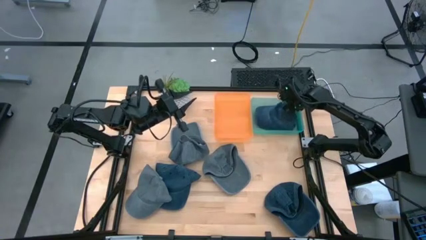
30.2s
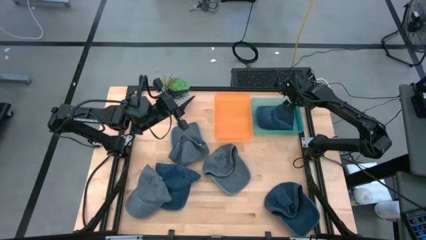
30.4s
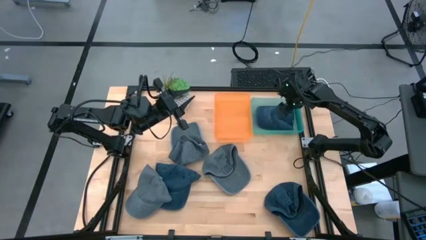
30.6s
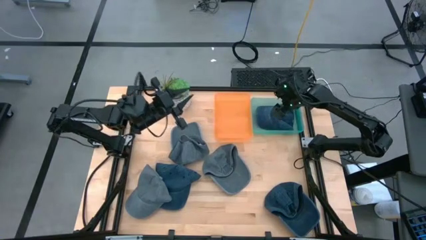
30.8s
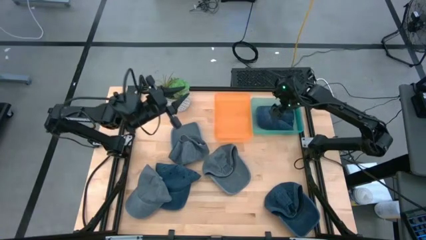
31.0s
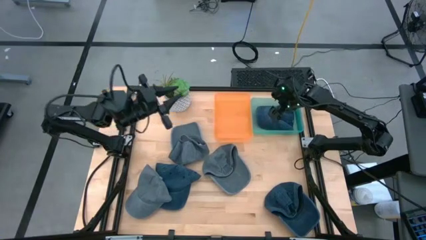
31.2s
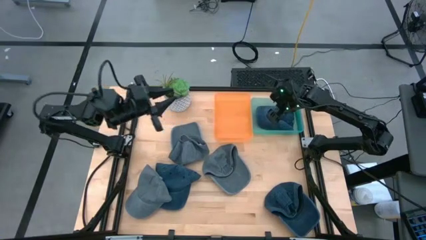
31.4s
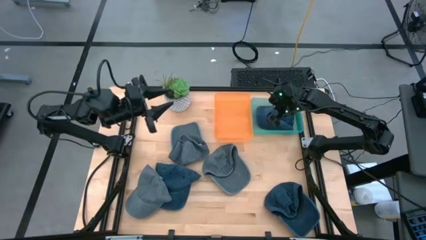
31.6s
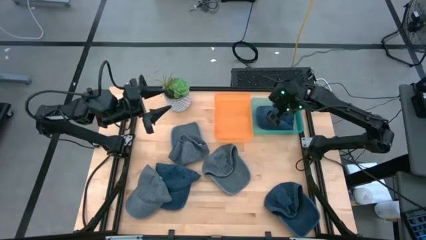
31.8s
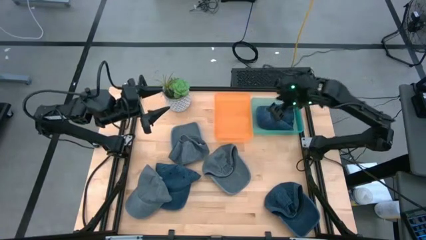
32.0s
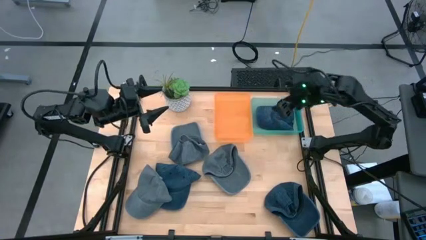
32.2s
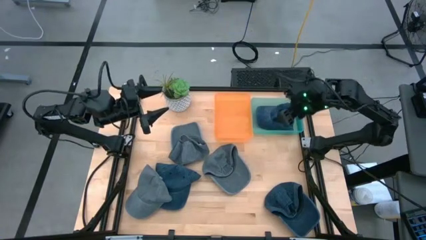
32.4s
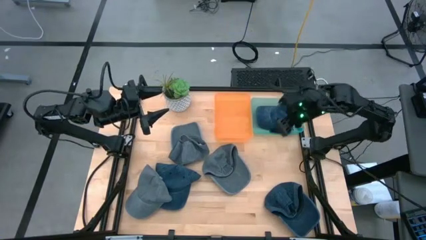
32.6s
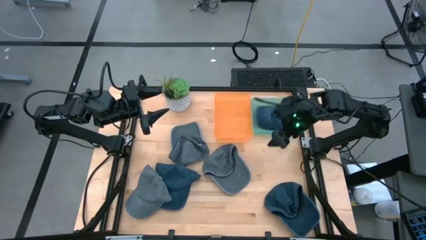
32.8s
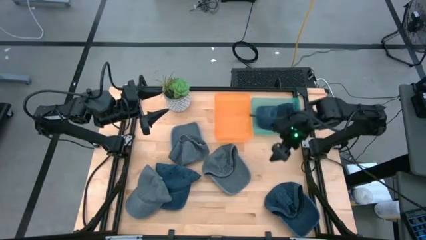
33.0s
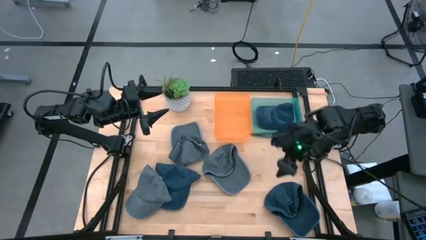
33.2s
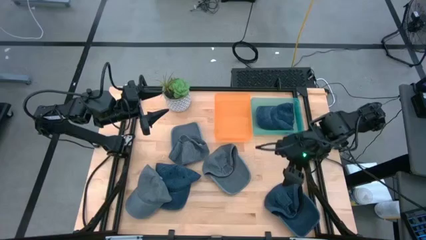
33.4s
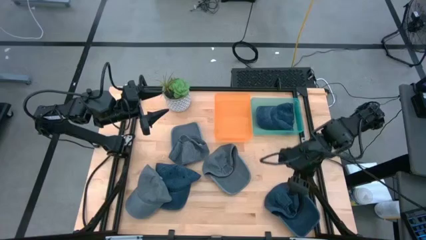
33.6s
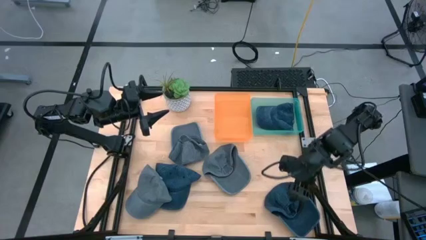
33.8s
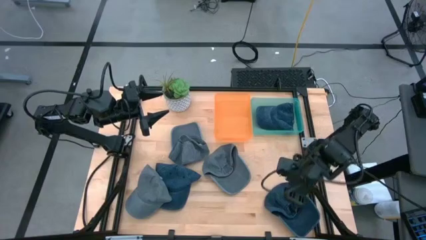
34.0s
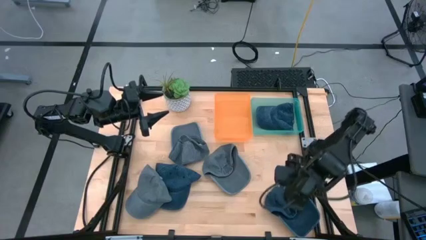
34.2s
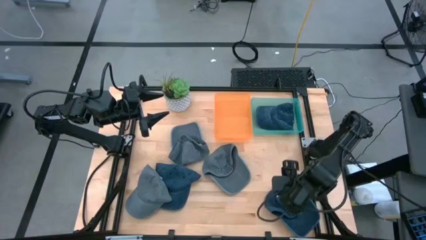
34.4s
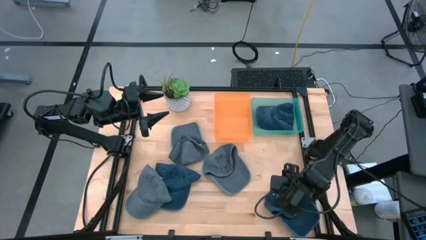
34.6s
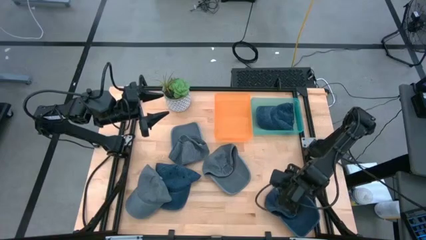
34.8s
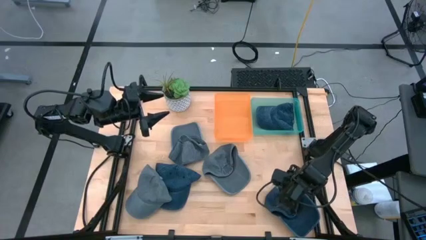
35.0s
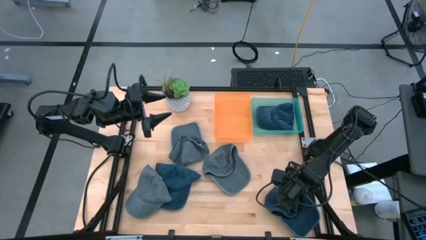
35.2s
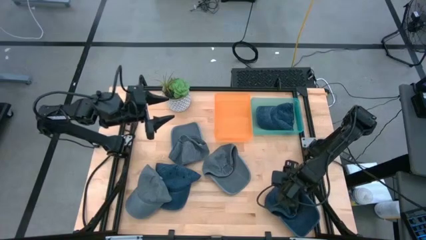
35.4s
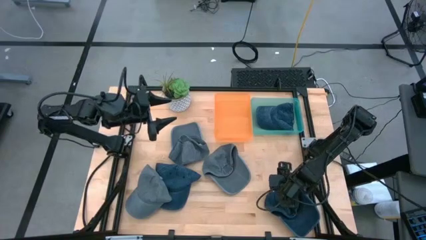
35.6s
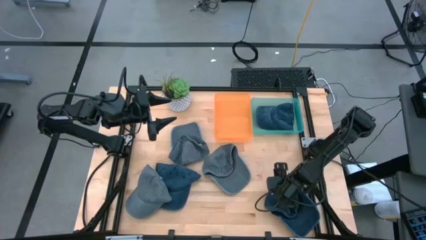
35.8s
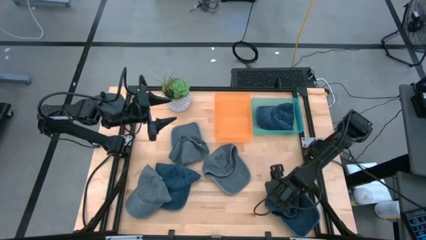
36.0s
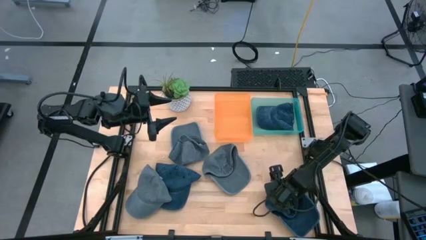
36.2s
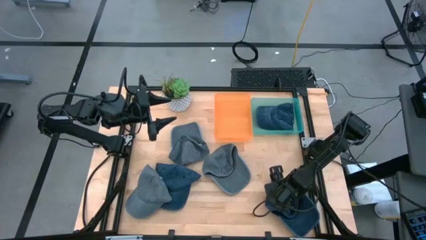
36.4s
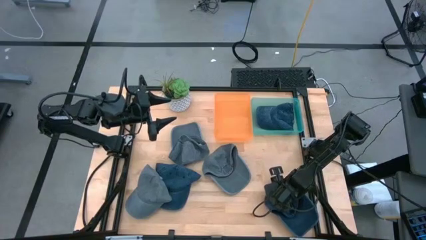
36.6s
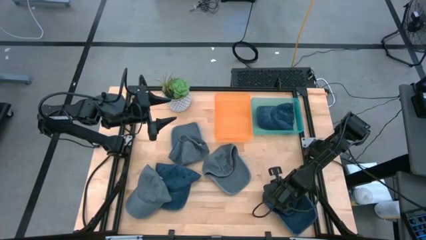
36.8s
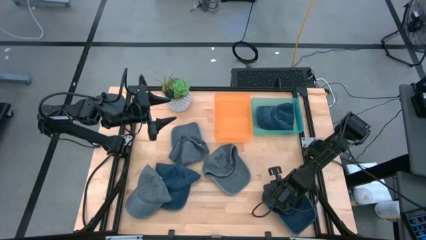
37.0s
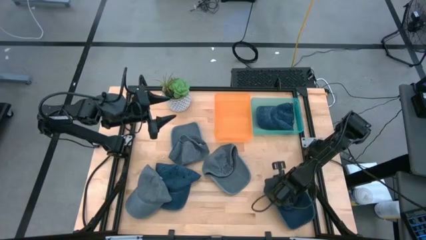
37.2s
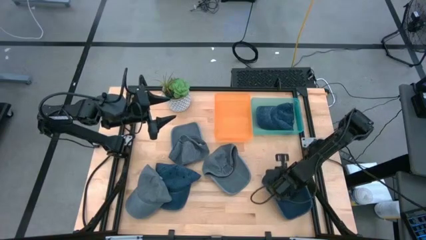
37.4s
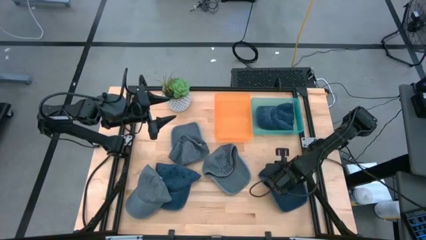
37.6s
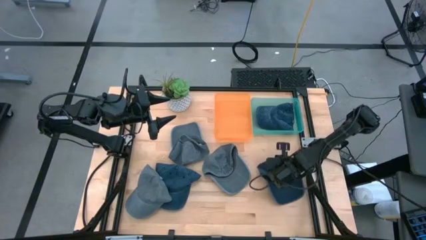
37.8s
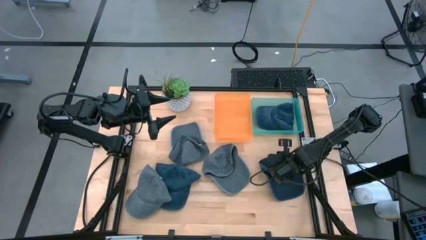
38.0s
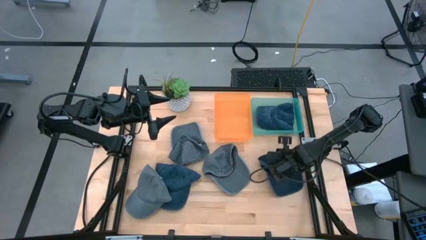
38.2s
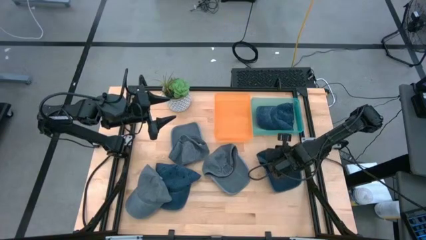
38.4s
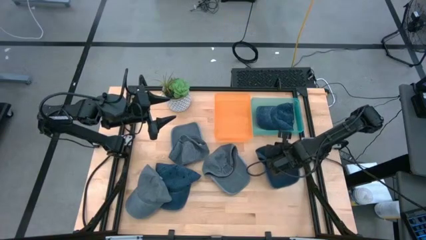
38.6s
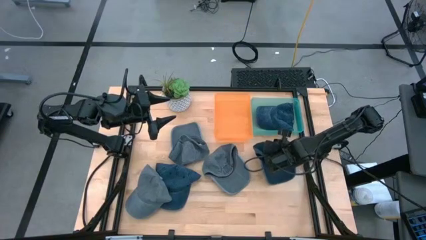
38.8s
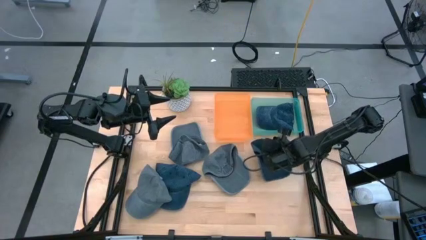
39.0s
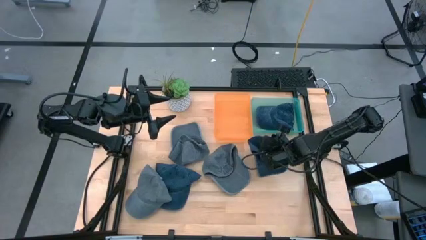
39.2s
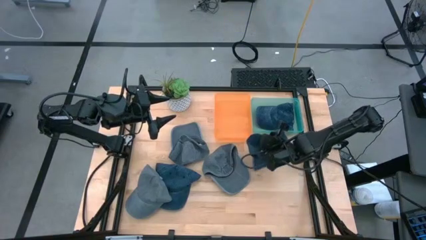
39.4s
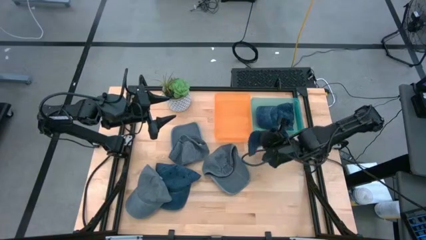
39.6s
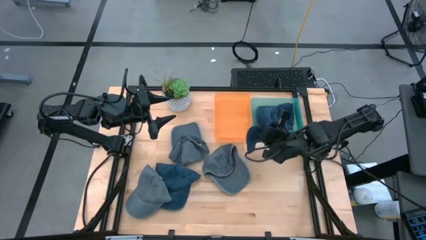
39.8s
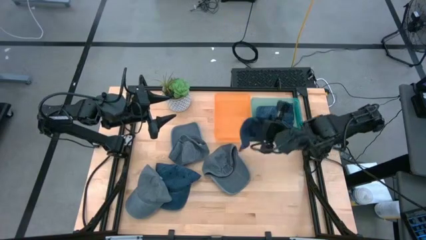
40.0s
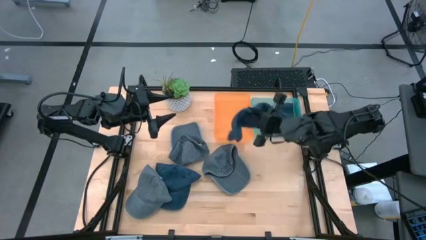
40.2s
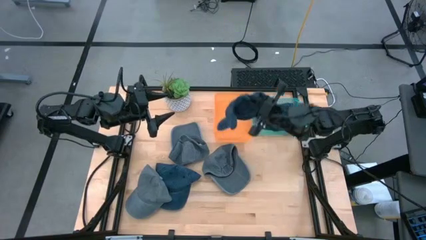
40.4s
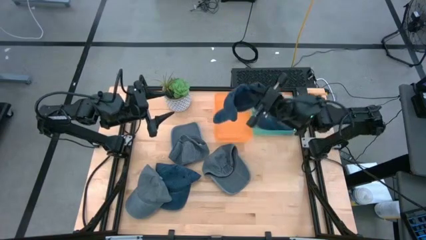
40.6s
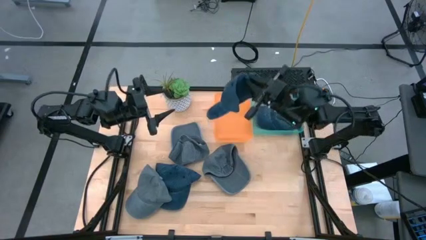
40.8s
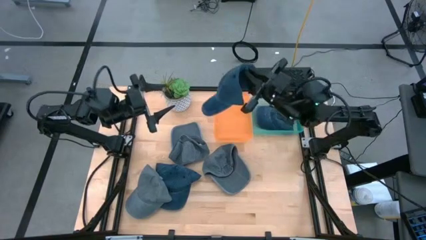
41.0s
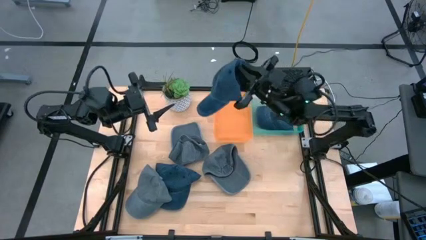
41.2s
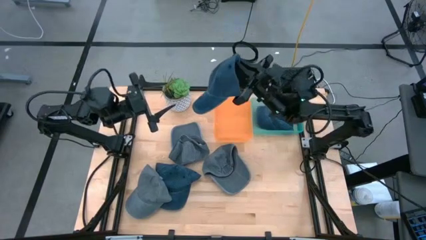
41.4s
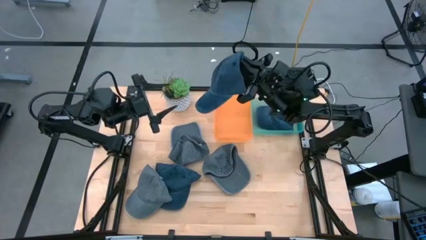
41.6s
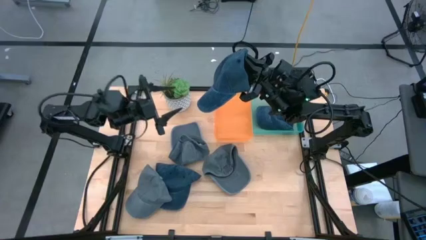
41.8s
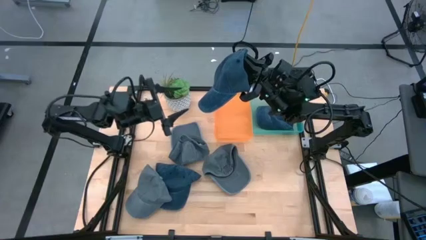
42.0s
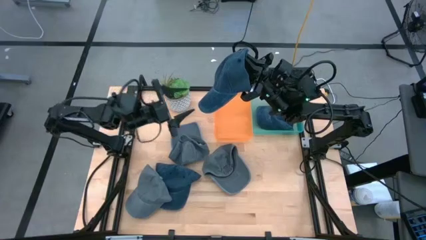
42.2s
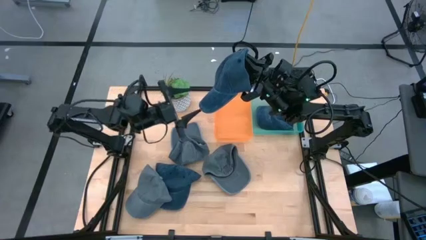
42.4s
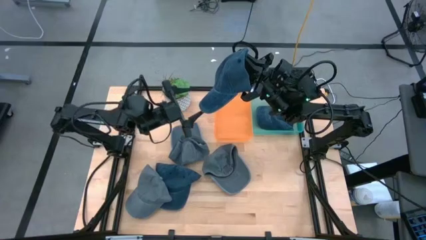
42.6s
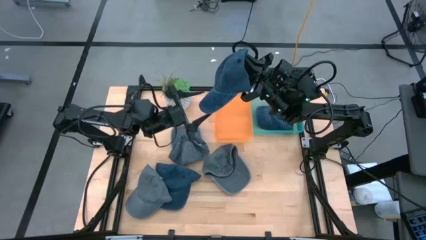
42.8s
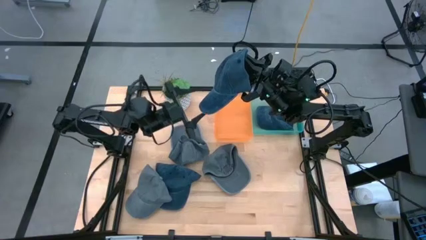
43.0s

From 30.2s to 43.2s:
Task: Pick & Place hat
Put the right blue cap in the blue bin

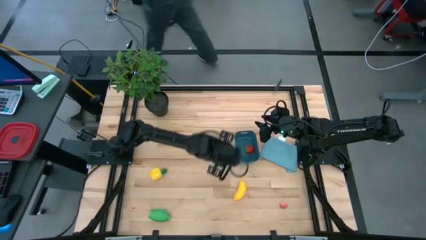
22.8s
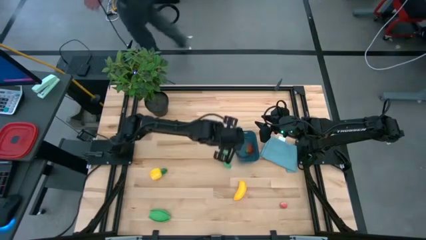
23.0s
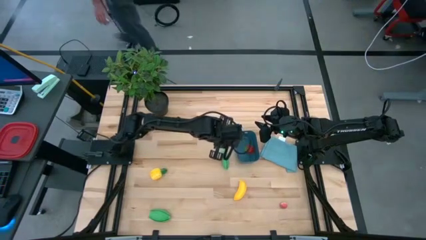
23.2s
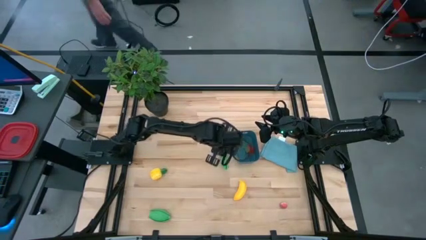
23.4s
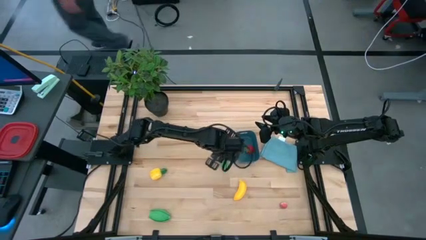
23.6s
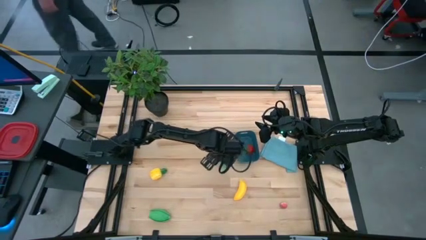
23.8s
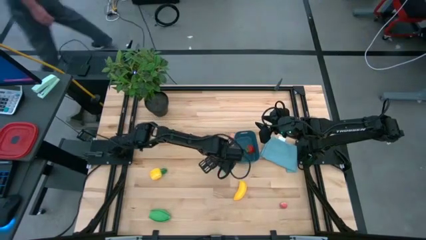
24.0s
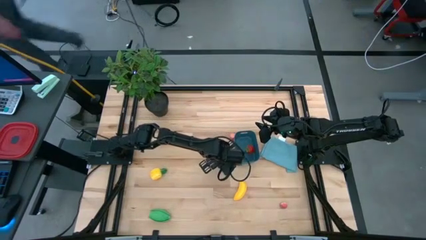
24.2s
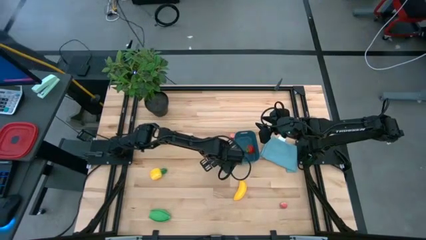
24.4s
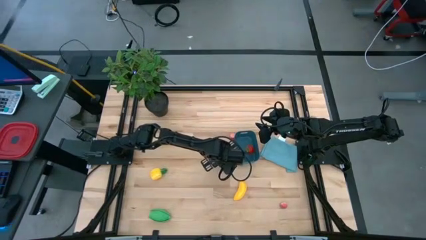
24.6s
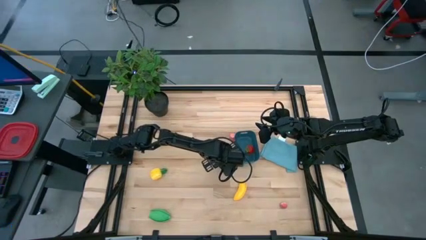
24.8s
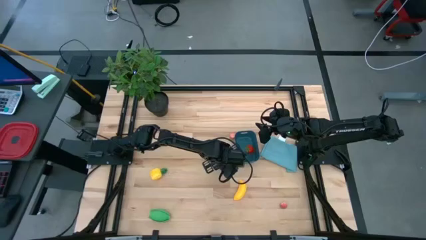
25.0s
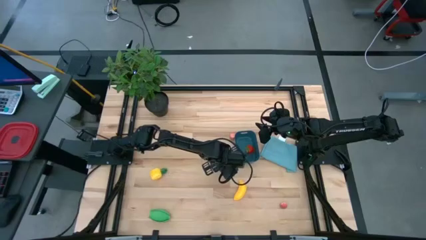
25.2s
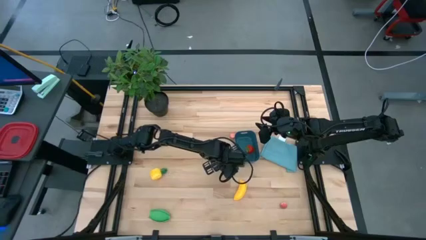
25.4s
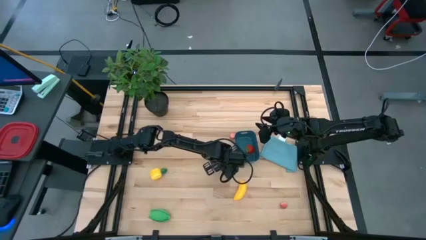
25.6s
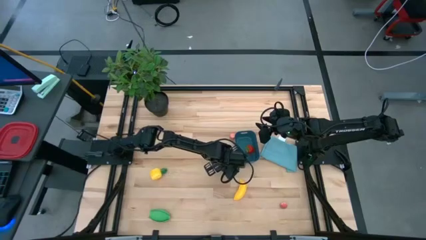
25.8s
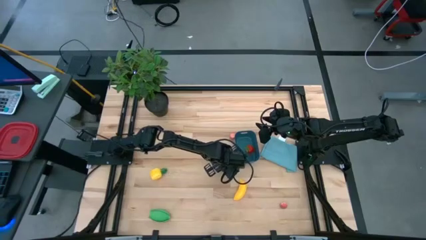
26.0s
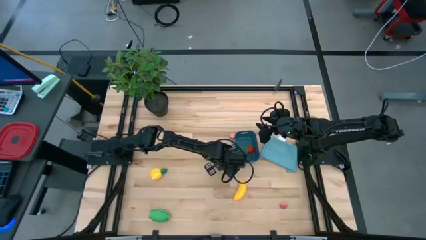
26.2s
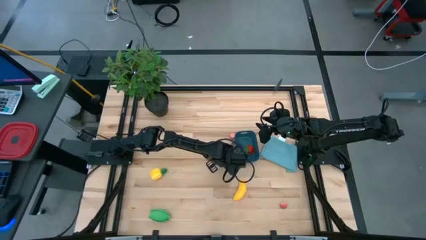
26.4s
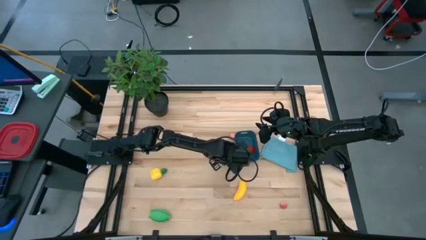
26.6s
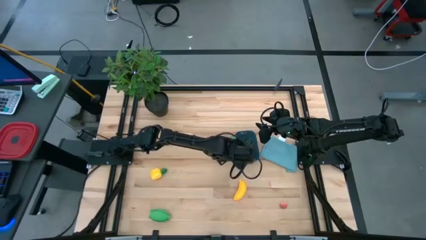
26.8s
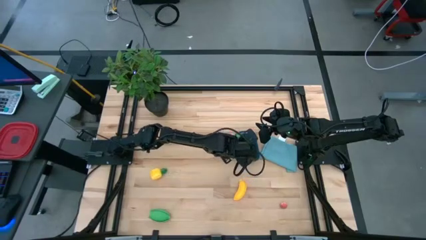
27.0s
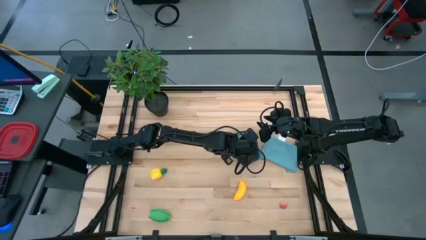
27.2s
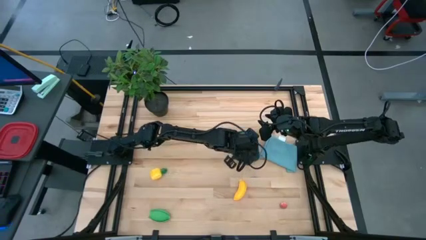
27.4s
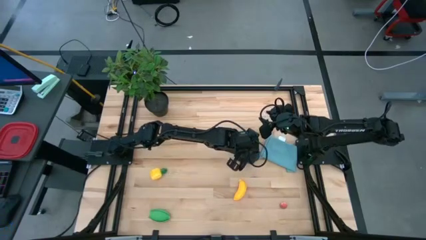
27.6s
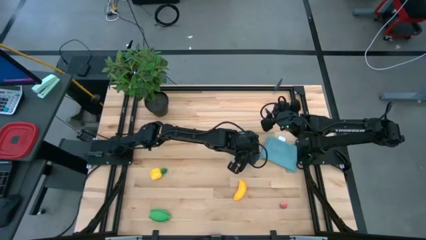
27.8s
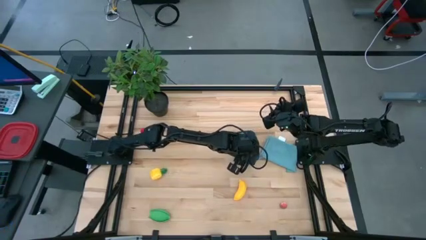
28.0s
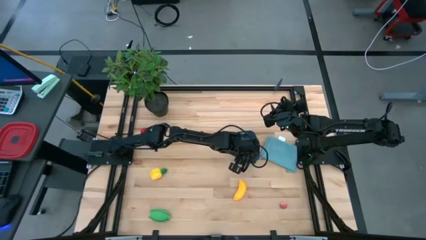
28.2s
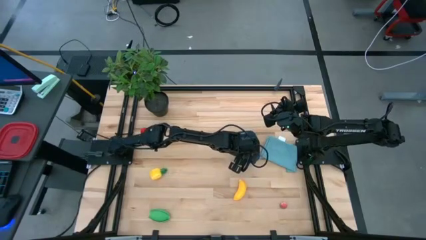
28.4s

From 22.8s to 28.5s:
Task: Pick and placing Produce into tupperware
Put the green peas into the blue bin
